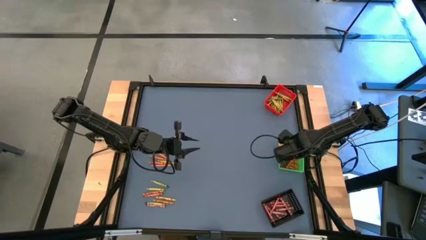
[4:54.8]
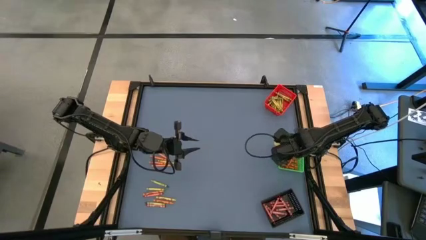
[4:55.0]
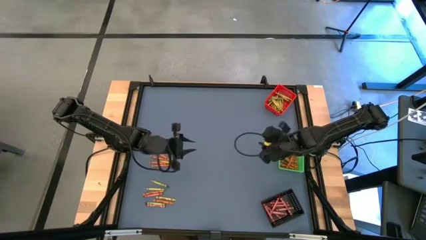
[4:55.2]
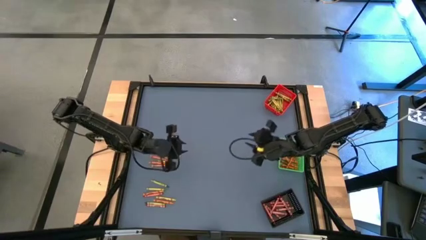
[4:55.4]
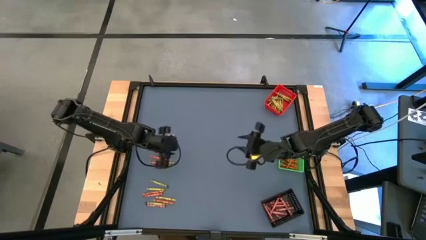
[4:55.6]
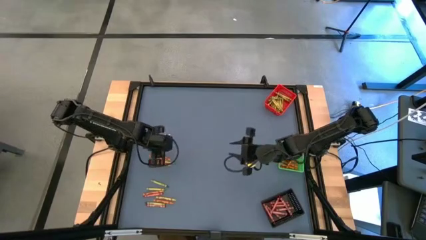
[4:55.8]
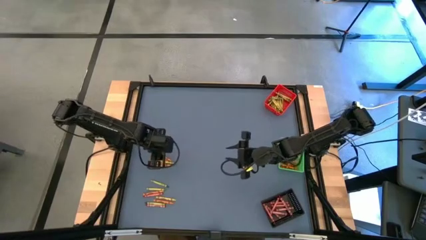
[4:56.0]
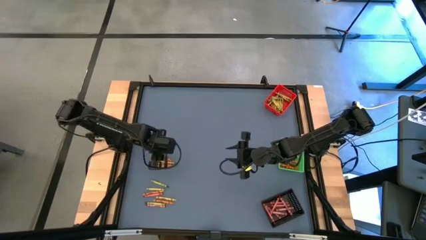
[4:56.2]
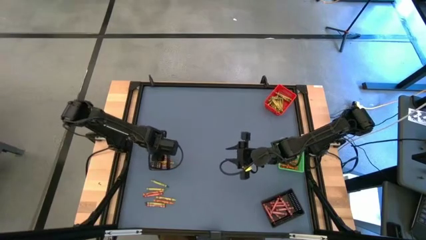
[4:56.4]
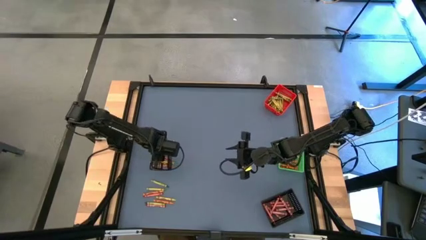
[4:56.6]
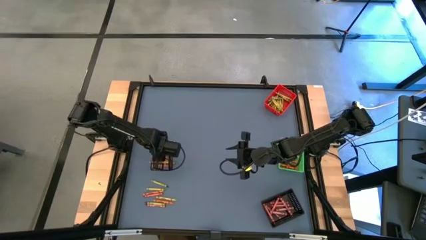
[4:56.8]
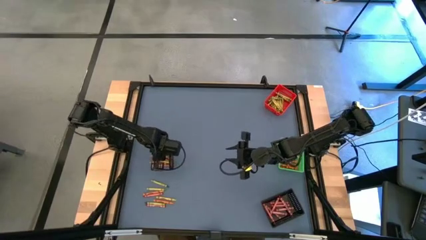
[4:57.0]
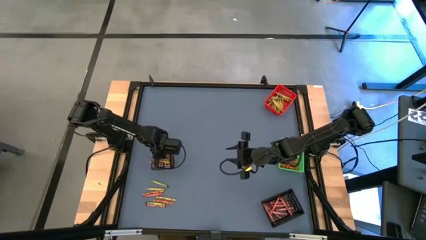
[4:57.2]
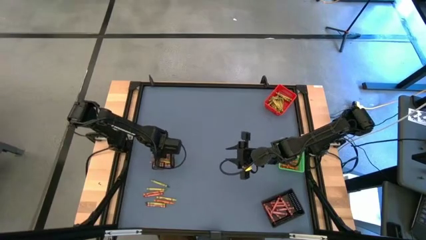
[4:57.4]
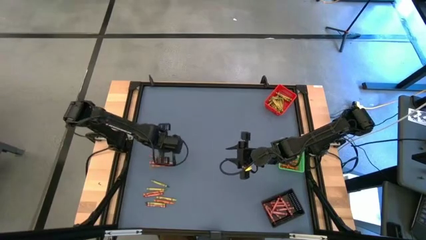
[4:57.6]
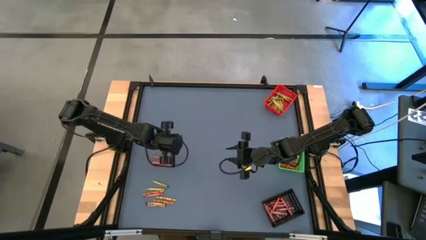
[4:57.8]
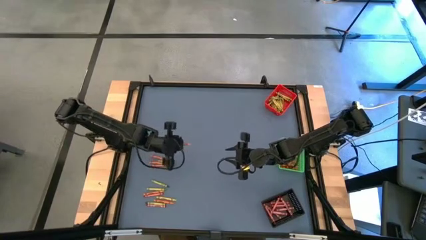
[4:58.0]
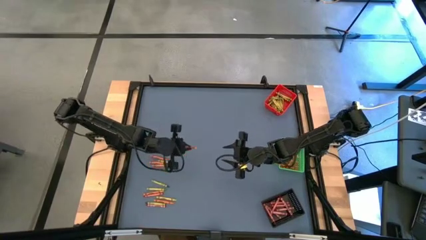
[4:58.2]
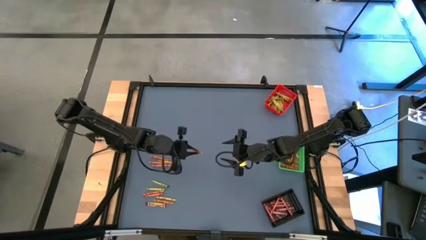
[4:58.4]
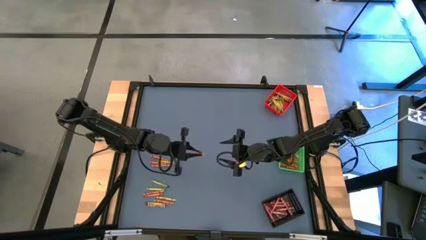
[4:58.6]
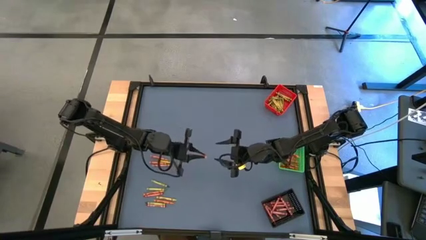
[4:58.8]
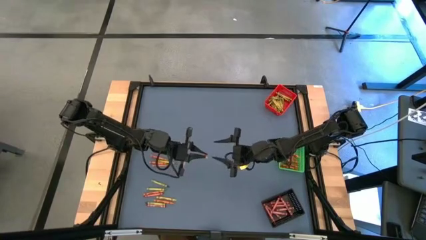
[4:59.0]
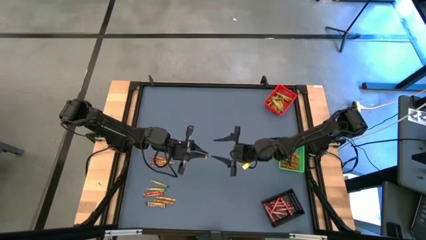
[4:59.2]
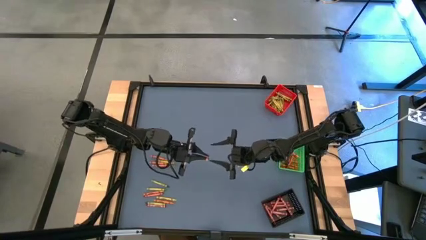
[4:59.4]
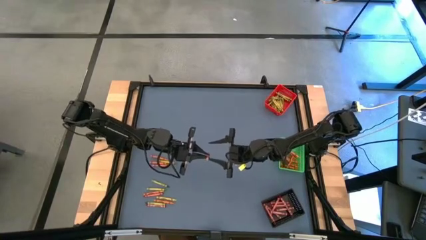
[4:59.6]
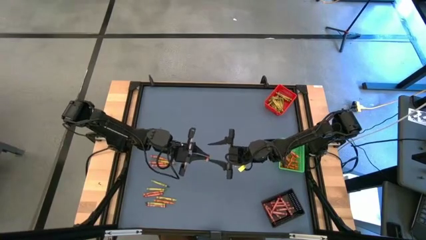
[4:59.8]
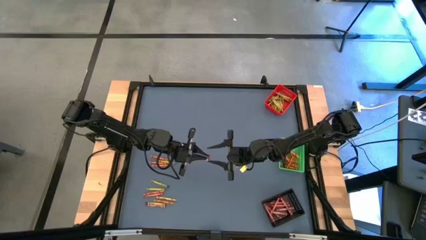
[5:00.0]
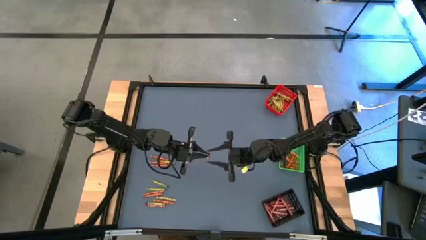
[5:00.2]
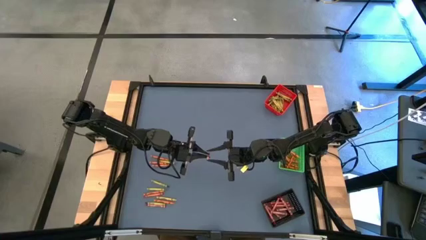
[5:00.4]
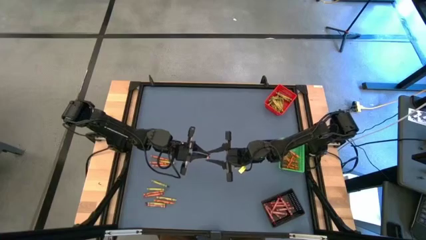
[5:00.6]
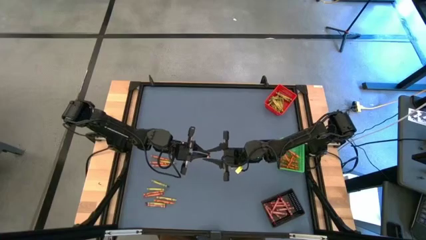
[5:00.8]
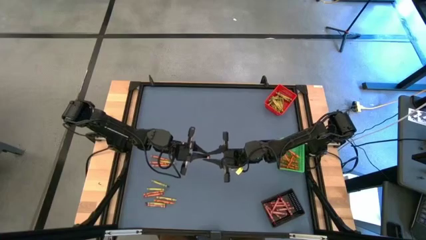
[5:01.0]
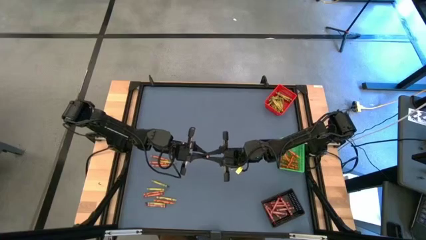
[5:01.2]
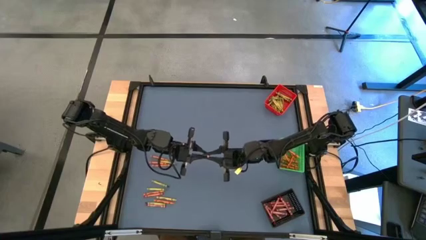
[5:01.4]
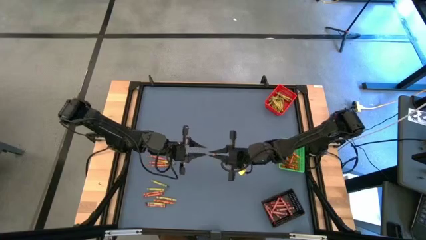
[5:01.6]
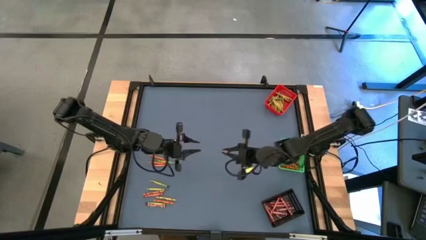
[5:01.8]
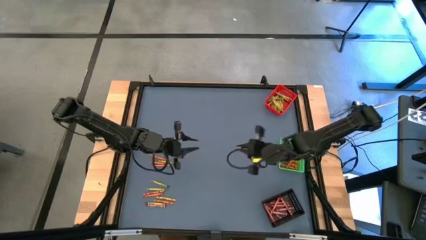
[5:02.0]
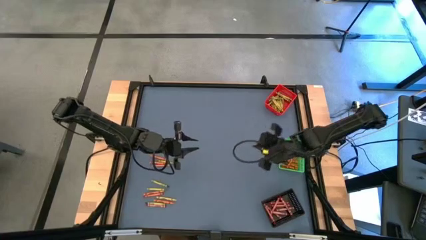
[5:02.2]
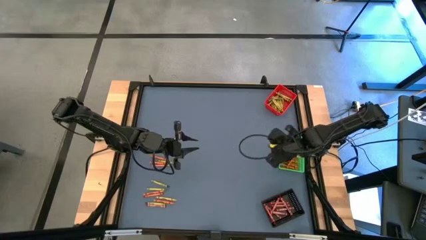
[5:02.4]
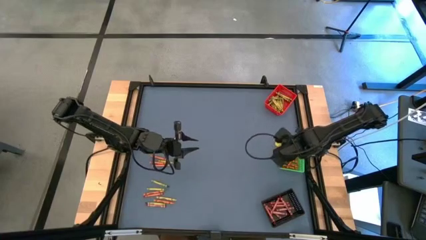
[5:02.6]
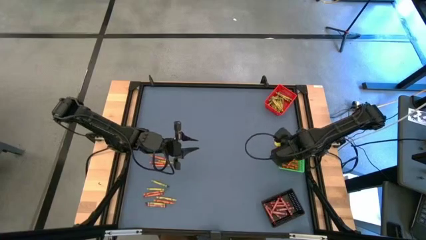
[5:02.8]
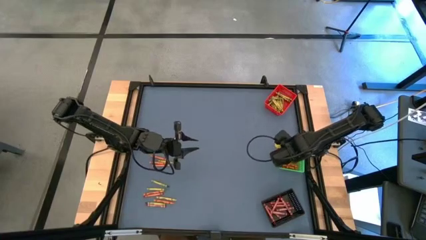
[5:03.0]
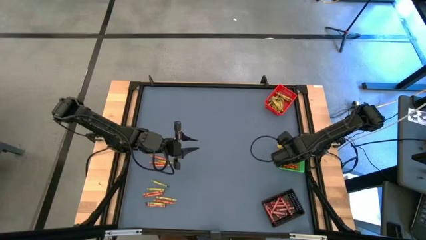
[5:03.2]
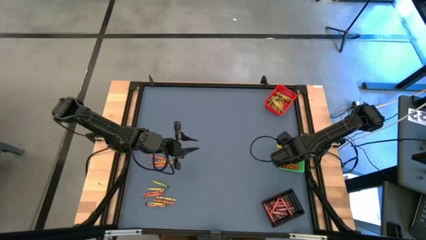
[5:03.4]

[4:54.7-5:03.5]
Task: Sort crayons
Put the orange crayon into the green bin

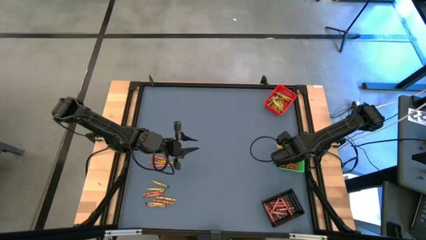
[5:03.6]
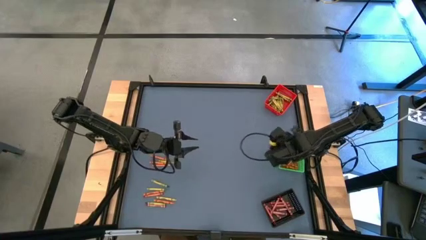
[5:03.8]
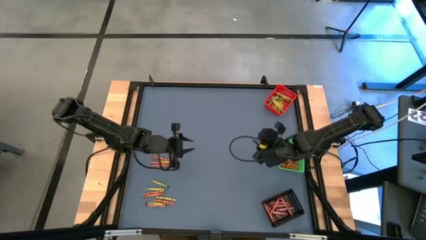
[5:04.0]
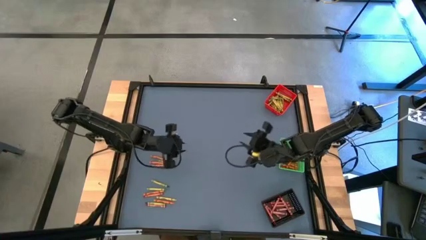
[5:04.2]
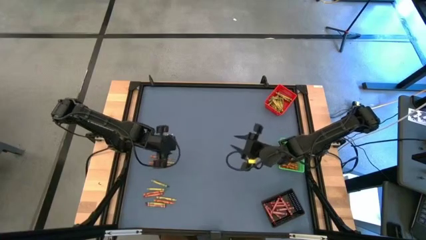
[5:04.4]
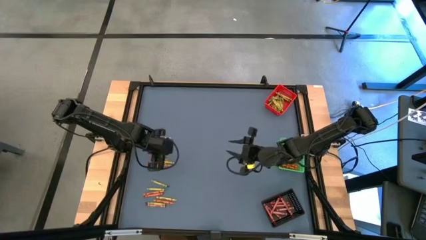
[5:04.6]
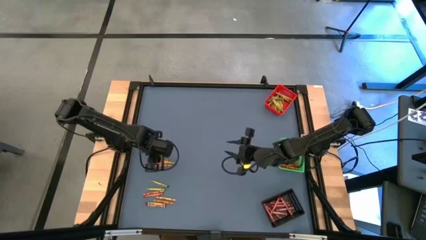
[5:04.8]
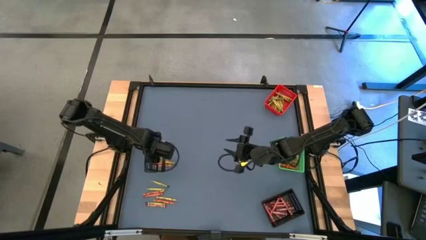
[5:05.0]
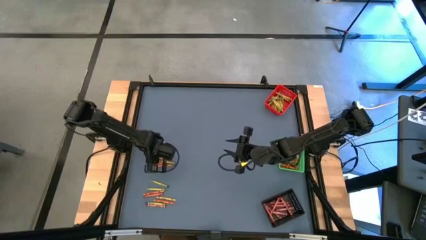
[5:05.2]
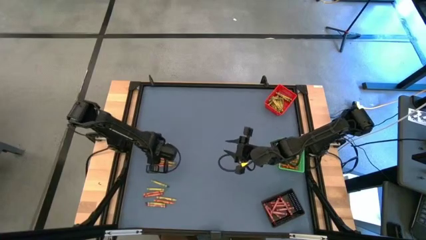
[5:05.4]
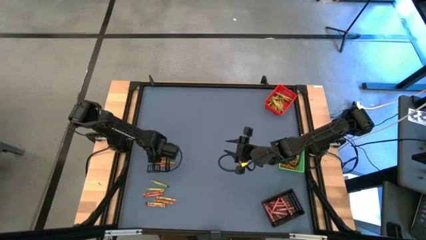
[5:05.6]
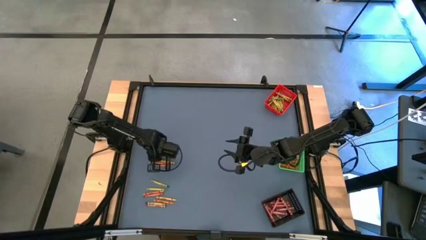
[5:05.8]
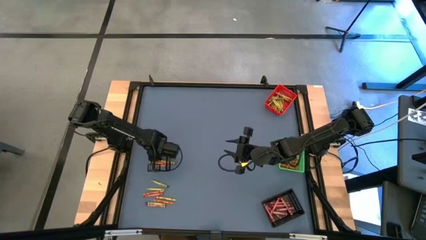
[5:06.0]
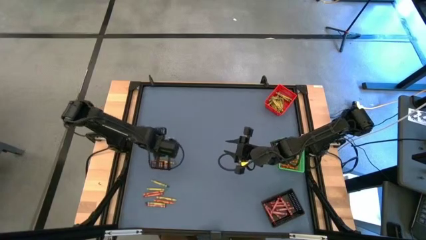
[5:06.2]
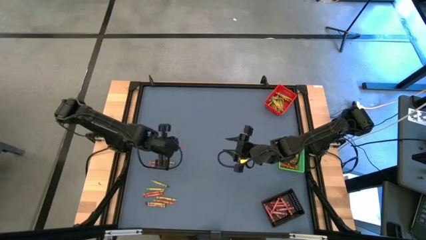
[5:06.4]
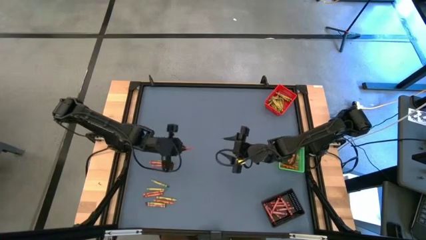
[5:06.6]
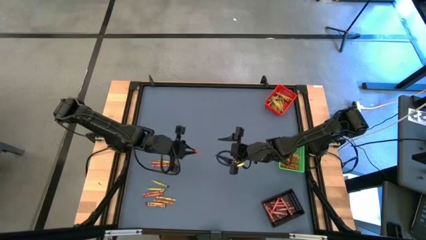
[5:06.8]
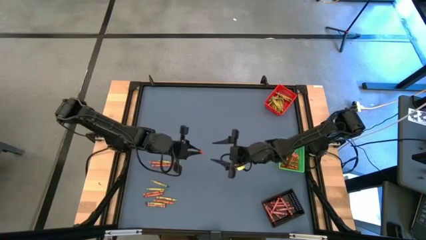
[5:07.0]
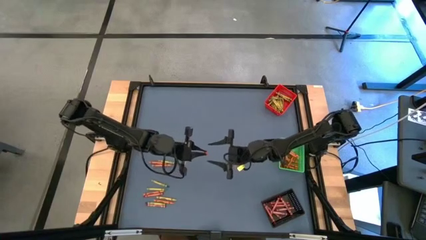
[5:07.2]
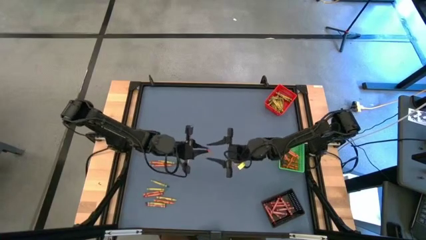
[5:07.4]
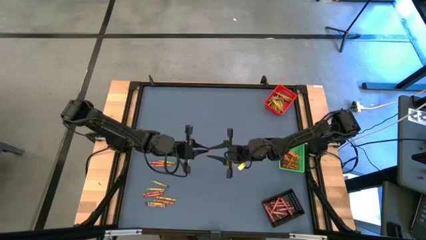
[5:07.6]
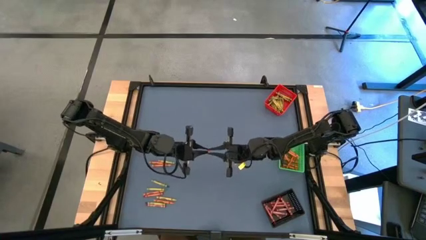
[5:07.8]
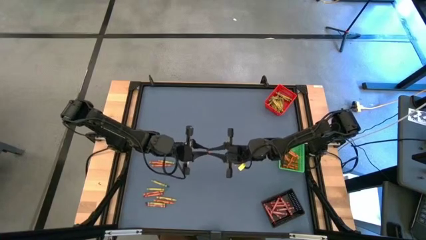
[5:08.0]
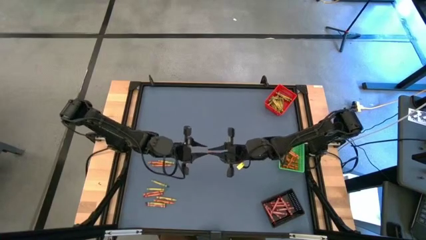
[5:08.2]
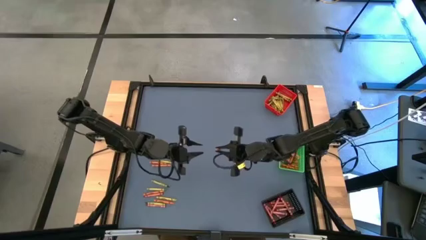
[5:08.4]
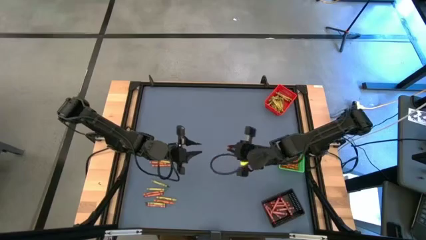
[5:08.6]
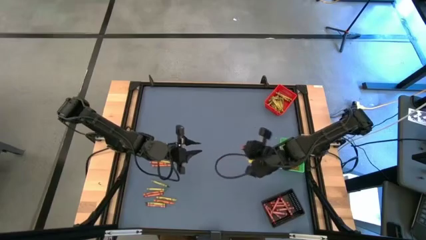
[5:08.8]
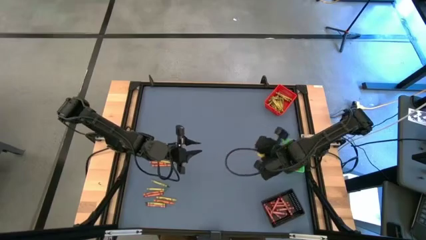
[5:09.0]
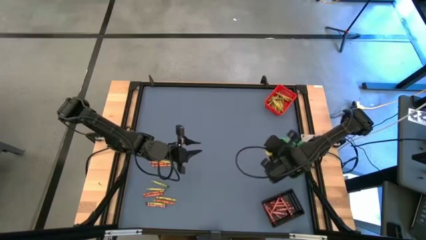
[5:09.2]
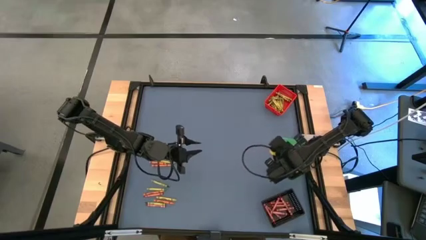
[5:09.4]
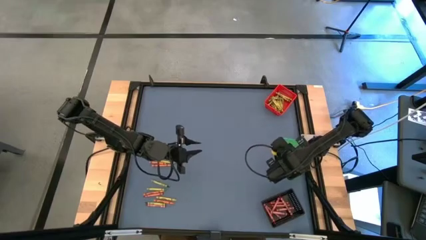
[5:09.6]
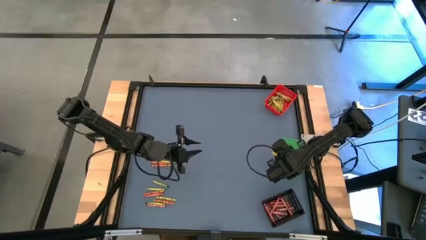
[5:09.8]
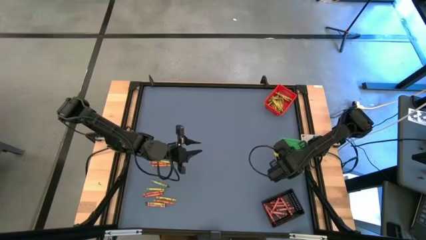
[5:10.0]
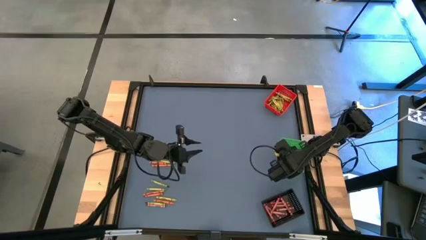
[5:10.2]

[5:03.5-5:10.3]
Put the orange crayon into the green bin
